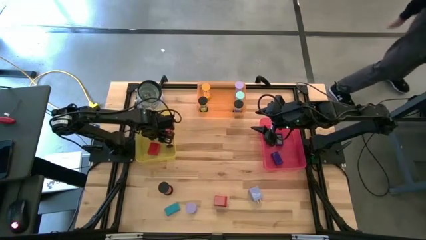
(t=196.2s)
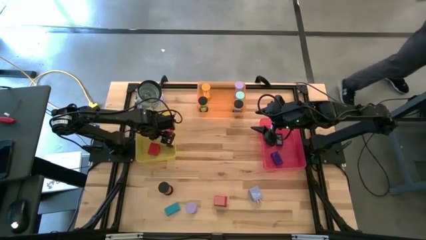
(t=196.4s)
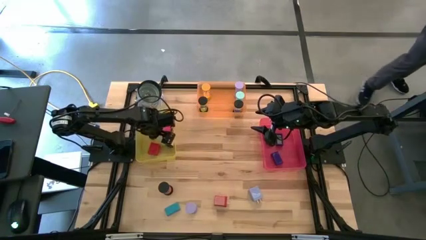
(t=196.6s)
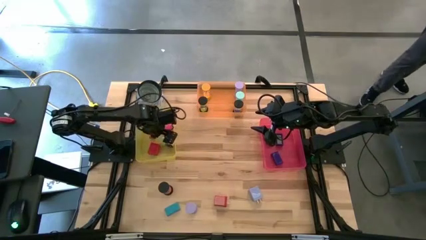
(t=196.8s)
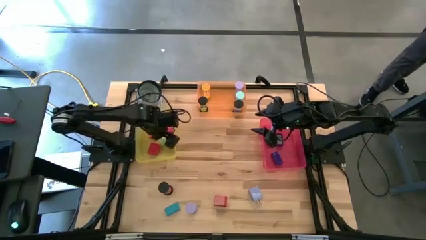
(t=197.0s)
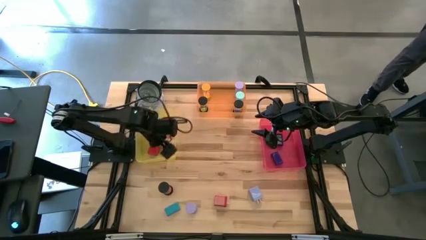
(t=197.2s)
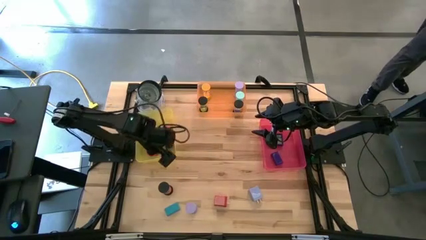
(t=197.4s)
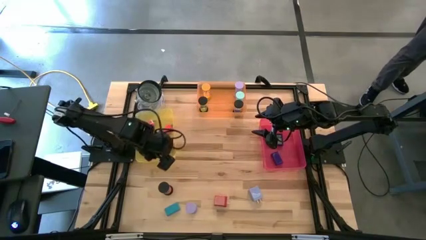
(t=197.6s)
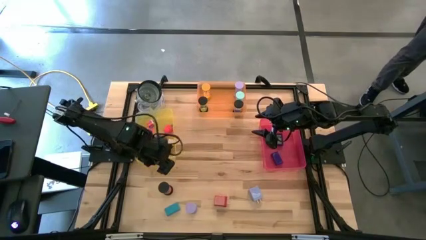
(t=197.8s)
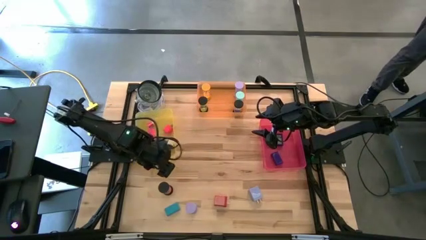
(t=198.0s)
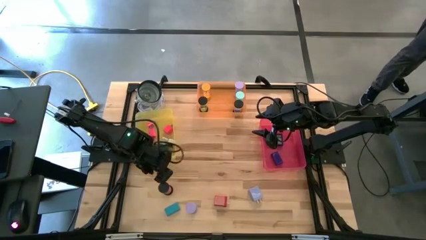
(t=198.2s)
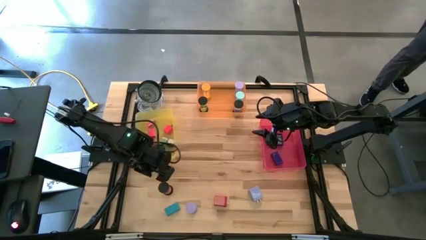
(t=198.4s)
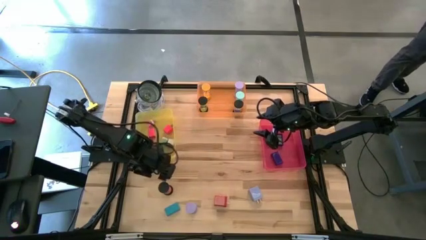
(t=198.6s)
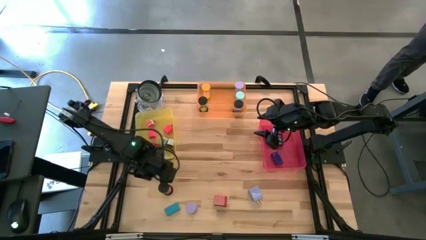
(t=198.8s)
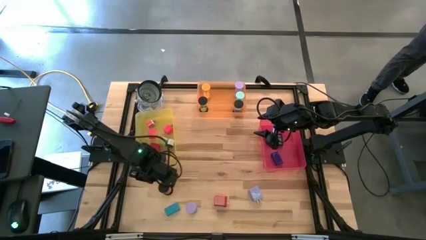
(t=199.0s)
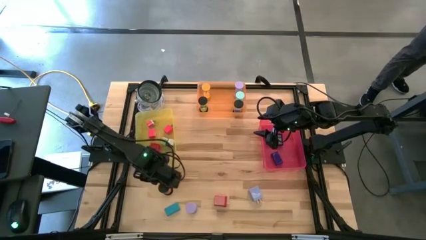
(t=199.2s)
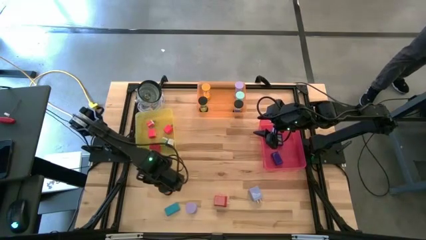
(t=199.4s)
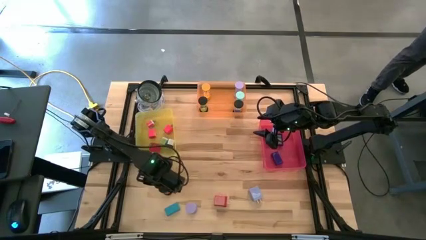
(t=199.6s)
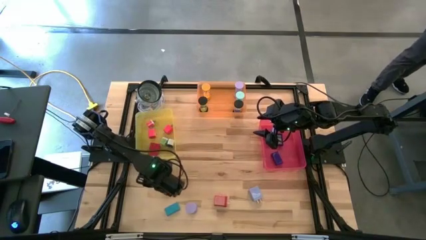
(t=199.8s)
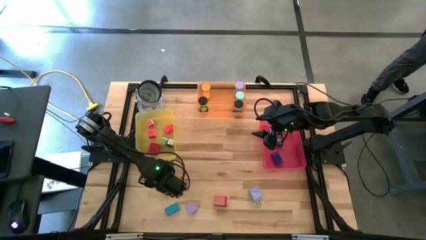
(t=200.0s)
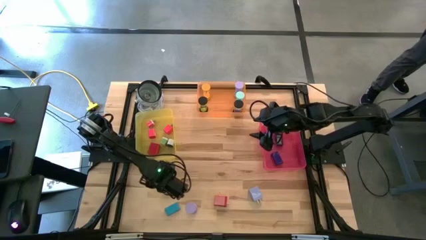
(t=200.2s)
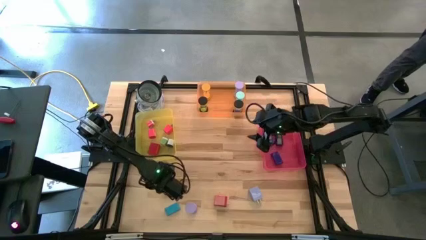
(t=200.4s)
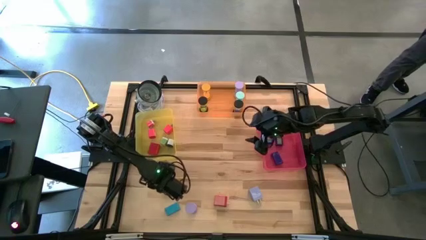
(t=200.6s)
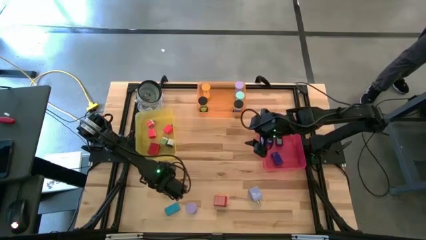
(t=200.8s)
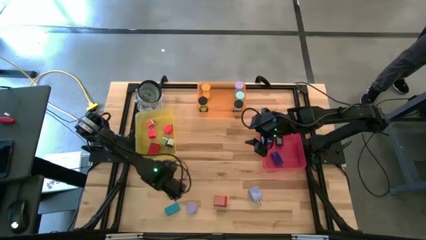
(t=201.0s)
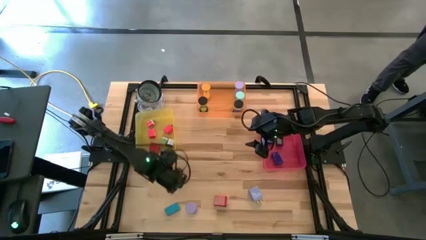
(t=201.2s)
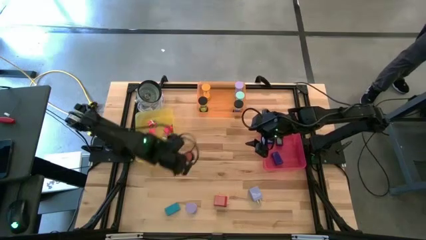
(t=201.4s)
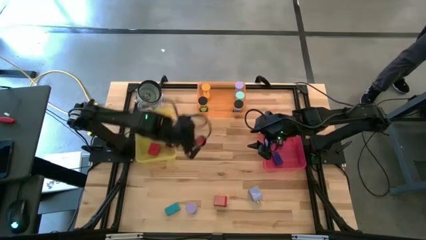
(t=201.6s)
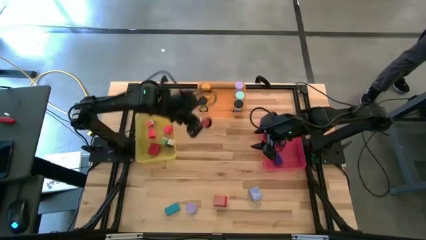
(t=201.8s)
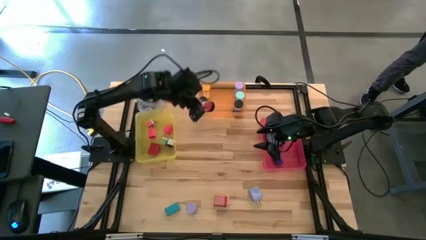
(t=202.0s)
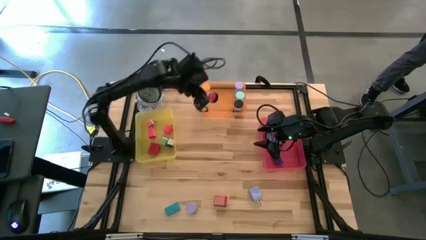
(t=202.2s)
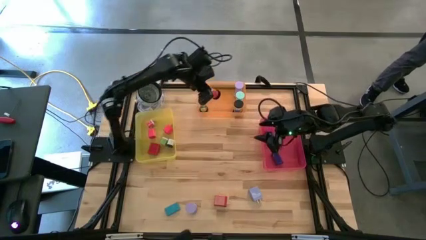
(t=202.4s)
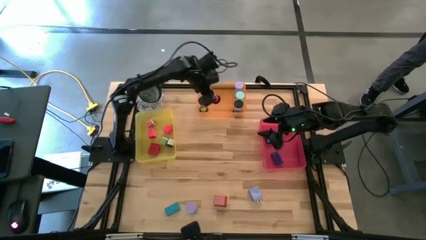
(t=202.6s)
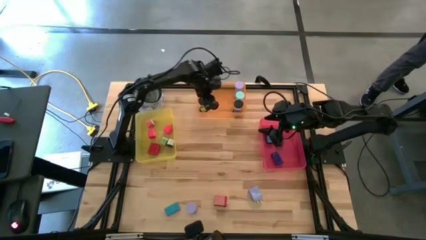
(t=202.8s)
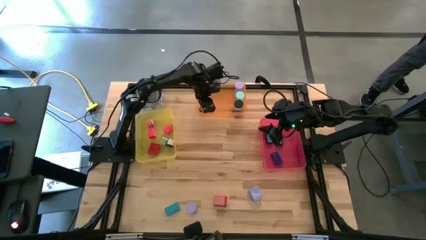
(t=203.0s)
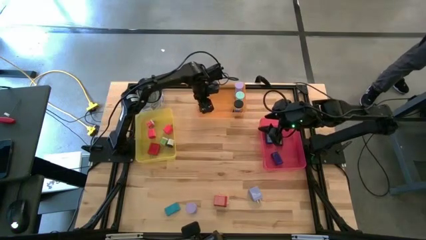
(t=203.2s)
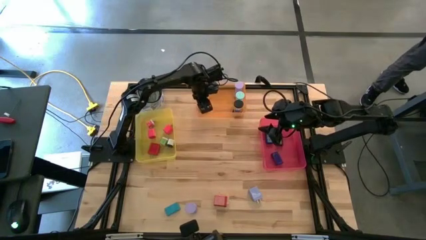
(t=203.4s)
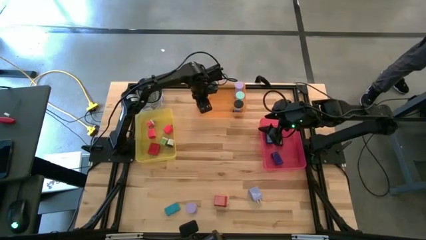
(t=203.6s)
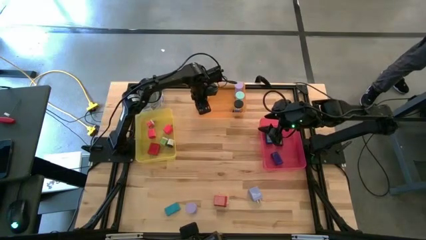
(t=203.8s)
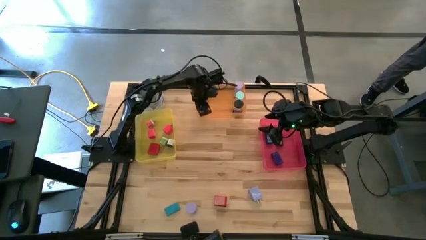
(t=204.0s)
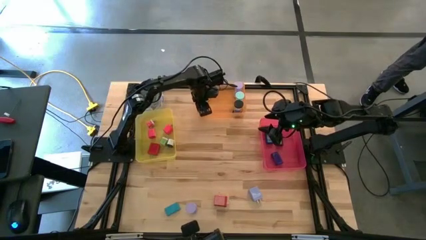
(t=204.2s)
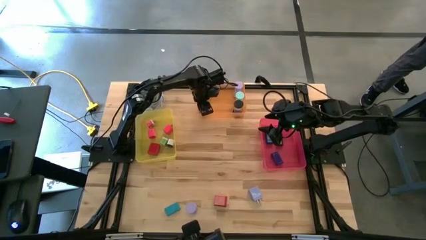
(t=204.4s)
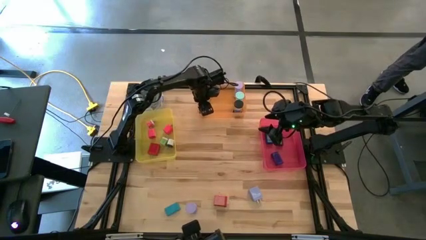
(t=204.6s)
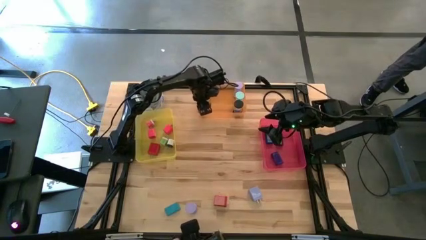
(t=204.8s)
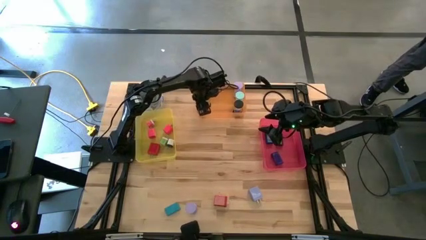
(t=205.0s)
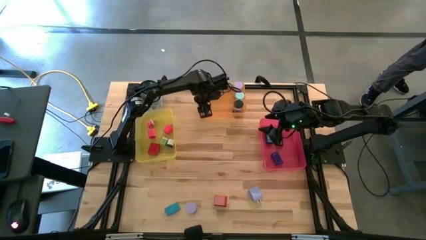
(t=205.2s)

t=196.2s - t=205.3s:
Task: Pick & Place Office items
Put the black hourglass in the orange bin

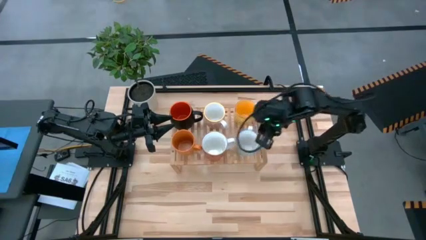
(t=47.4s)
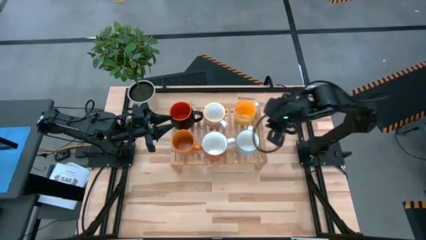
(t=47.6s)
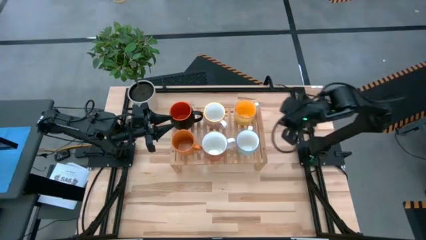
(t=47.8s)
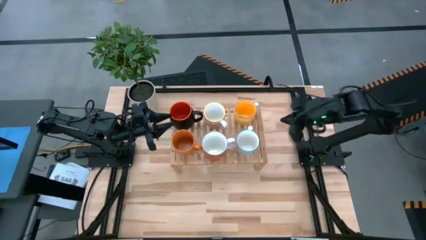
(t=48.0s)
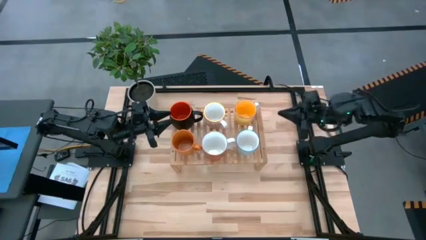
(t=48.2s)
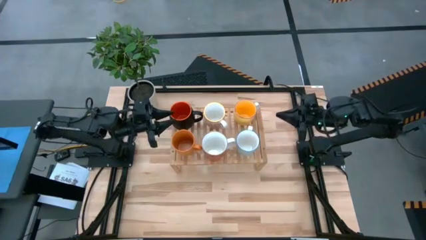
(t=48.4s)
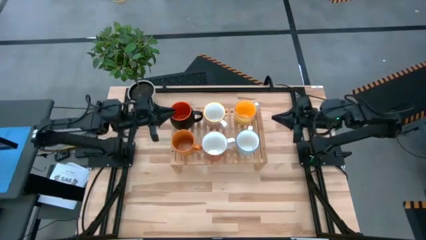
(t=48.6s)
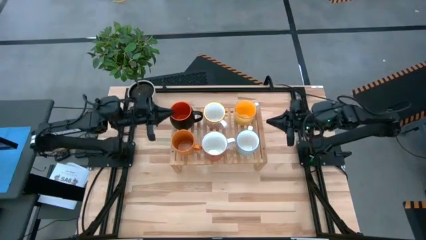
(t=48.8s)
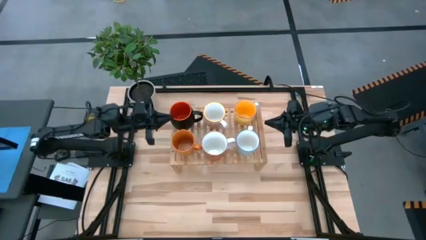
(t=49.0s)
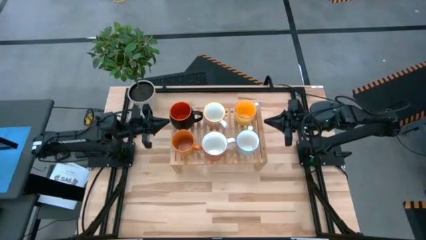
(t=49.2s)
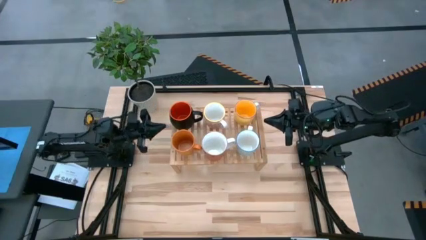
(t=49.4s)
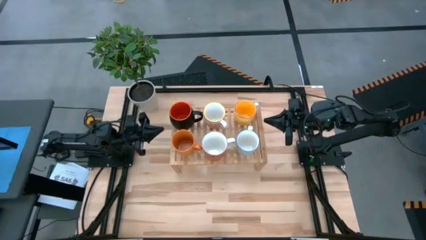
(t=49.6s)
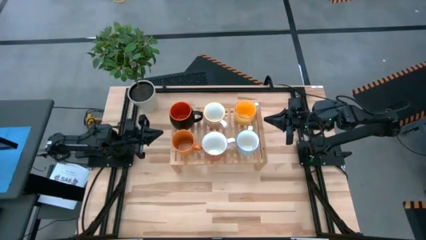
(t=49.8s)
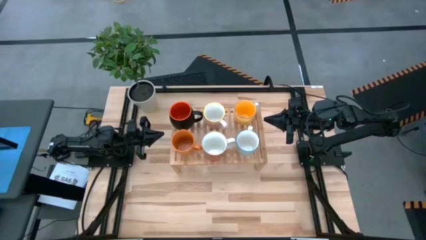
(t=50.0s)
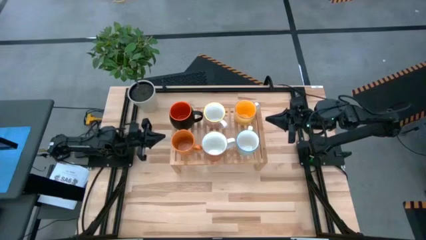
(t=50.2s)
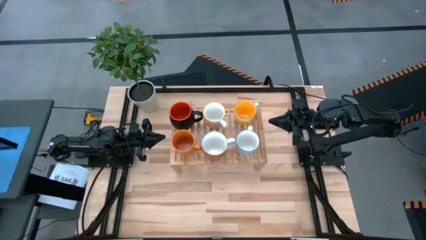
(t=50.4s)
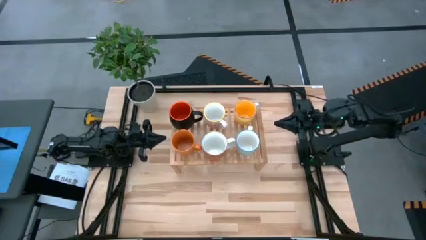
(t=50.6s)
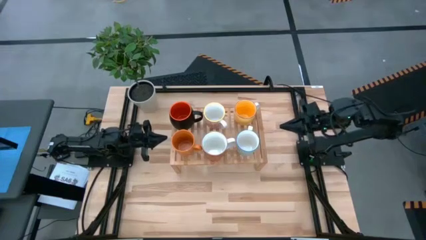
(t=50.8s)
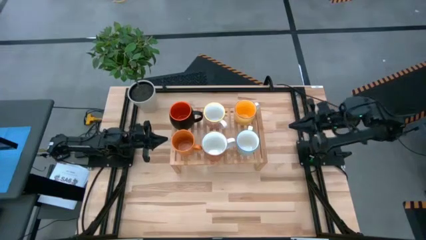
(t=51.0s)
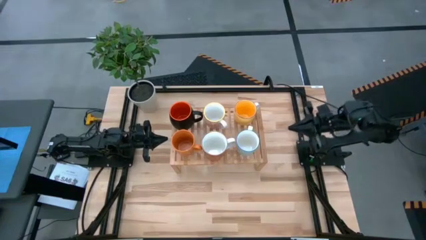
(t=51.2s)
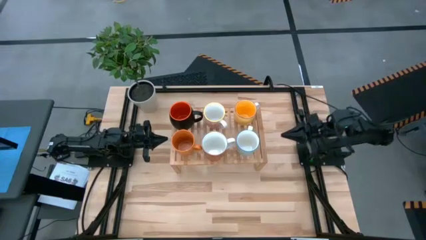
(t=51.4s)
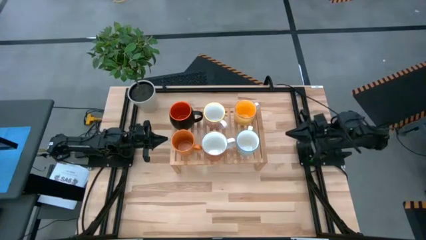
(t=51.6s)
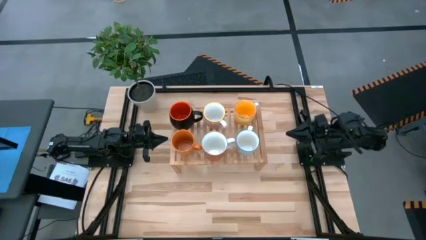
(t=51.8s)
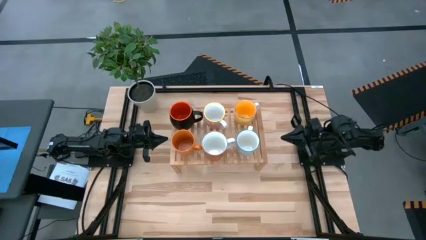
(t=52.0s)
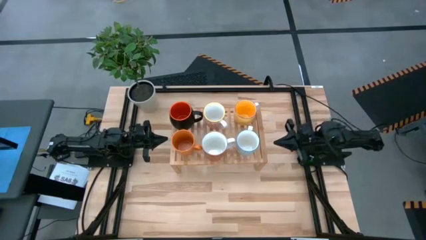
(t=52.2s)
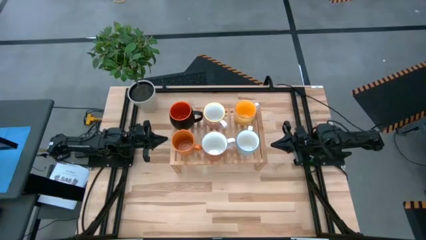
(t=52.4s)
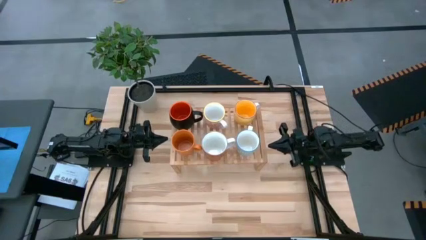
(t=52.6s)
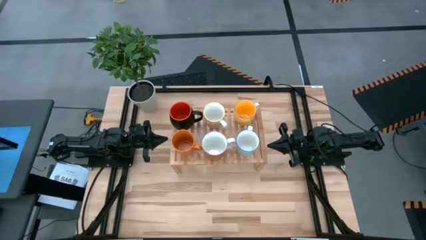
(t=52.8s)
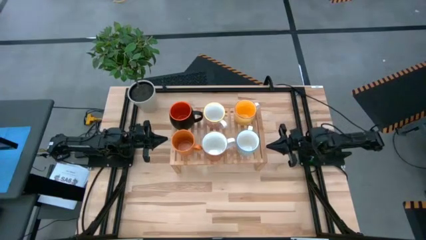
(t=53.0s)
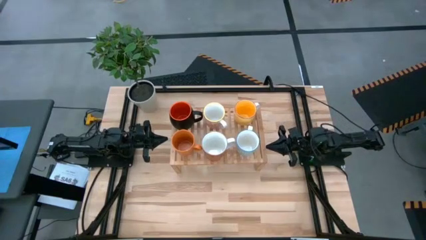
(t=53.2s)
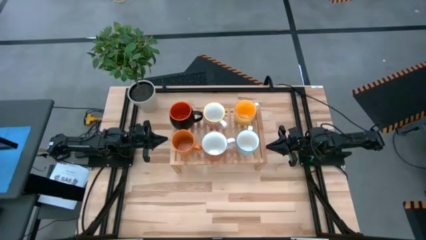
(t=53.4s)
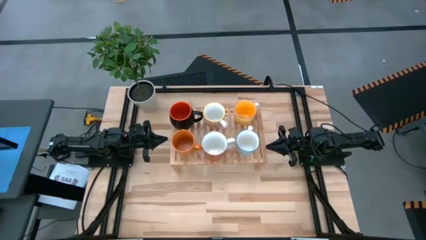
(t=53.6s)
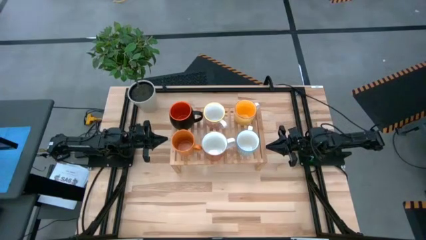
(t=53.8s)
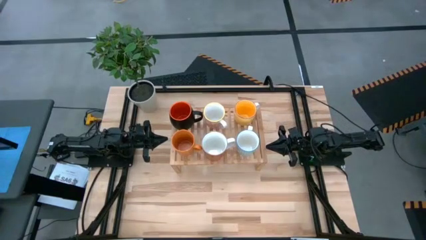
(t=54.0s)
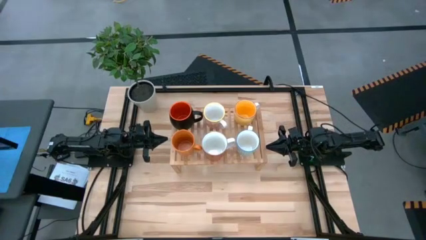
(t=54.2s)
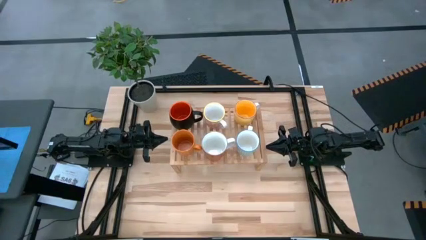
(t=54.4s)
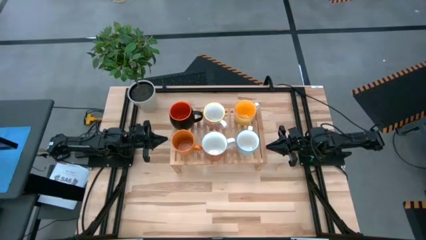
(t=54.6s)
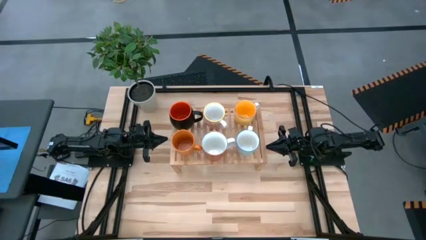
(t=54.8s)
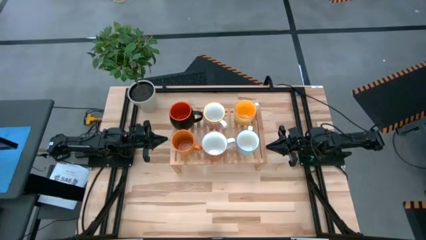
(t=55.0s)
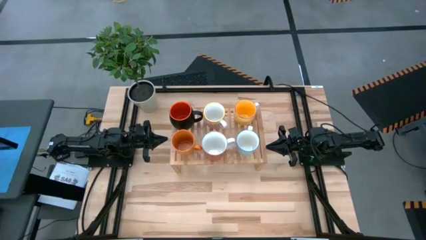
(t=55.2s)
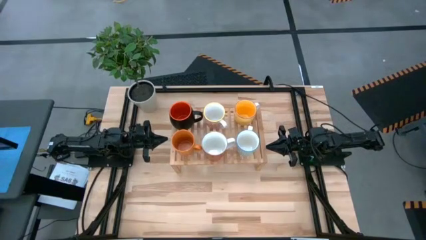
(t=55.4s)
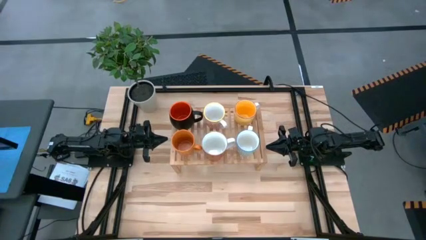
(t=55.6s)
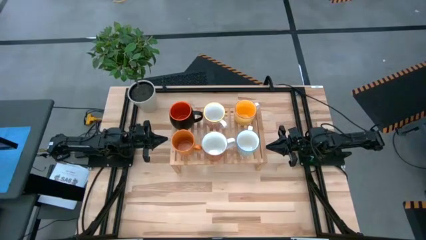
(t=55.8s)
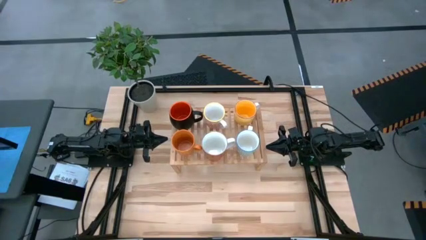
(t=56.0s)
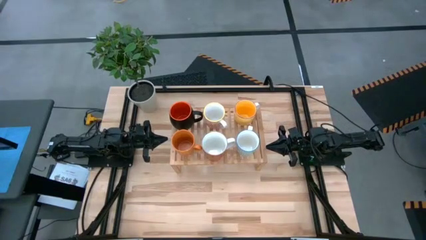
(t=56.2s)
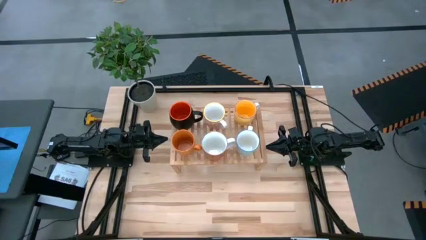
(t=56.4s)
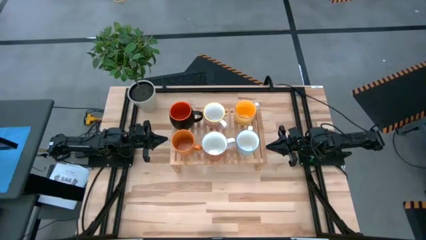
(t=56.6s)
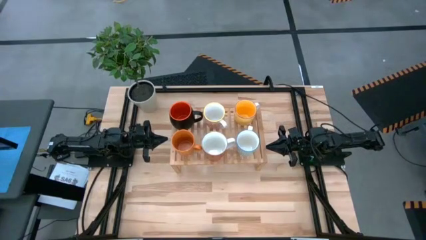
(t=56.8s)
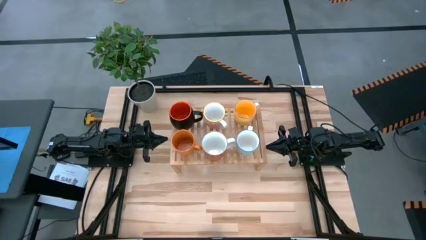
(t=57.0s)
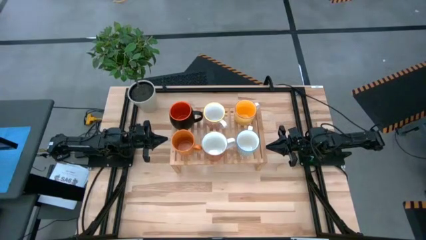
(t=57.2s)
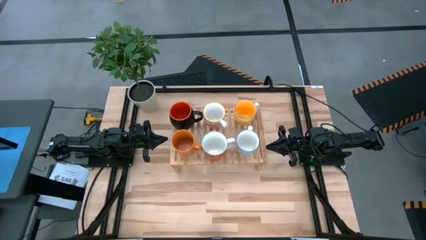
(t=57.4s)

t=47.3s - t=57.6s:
Task: Place coffee mugs
Return to Home Position
